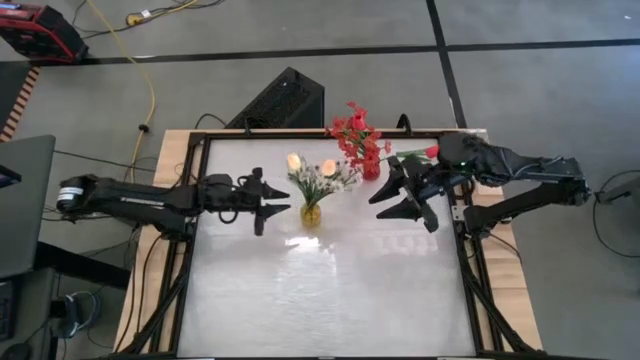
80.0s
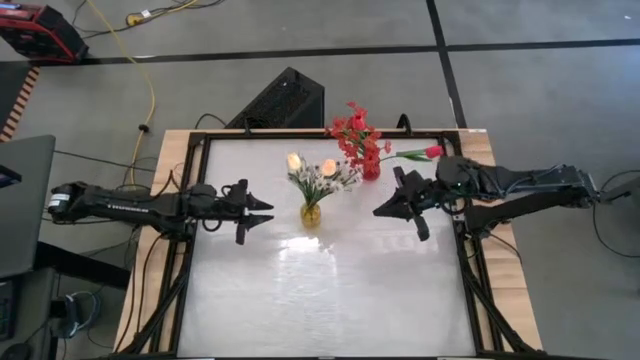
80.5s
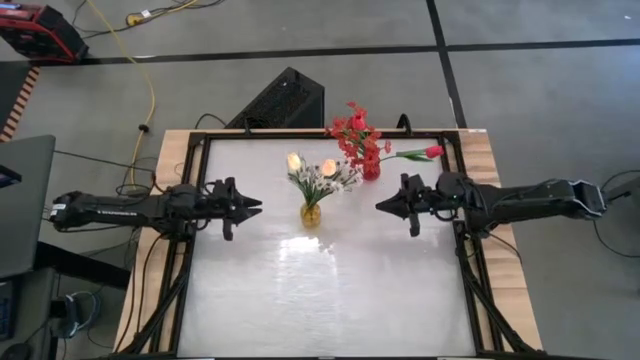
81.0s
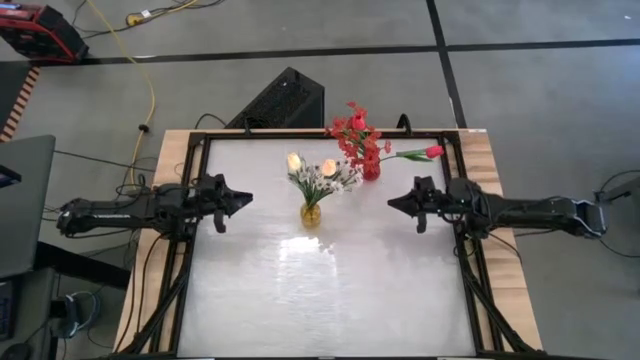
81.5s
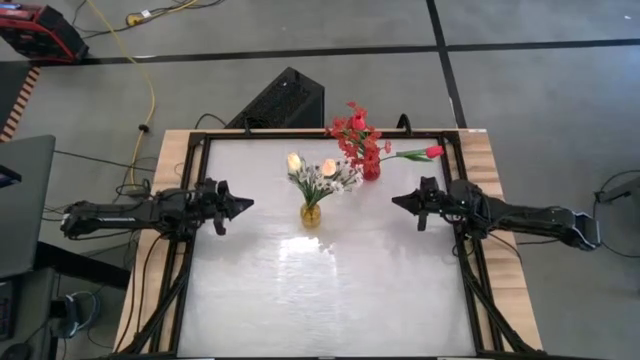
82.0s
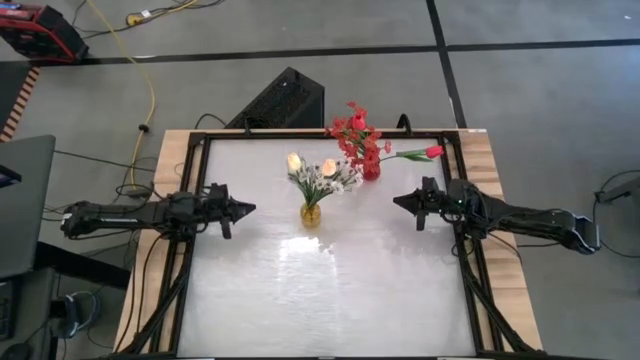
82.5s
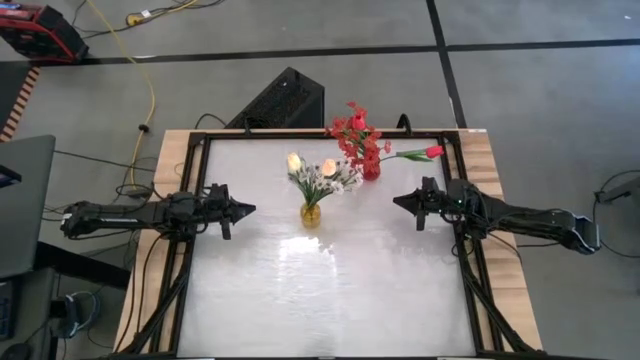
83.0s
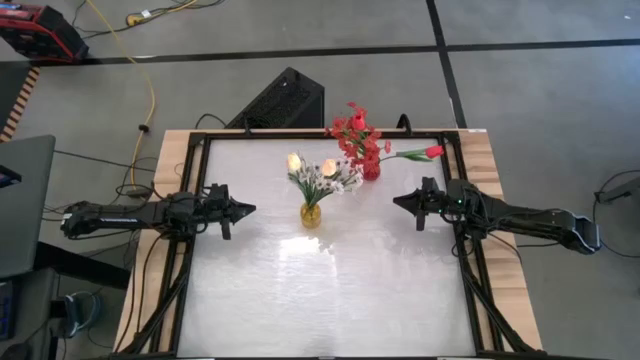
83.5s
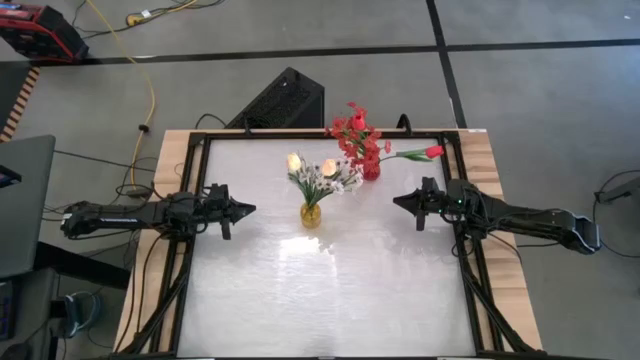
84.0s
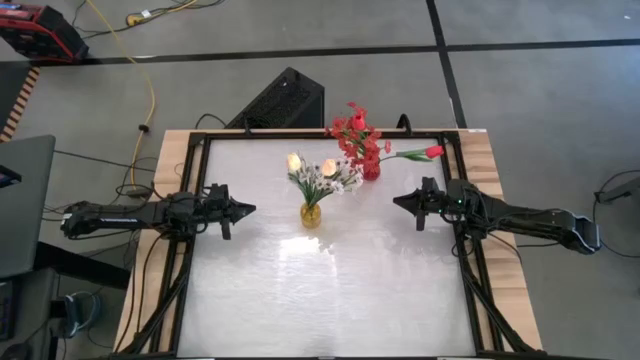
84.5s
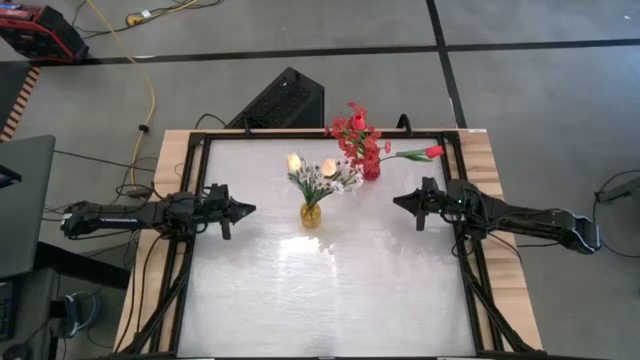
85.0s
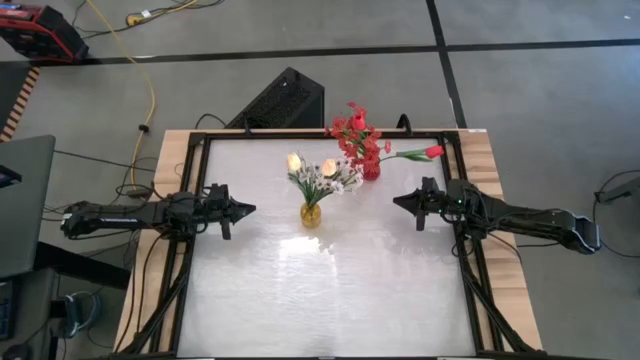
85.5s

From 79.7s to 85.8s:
Task: Sort flowers into vase by color
Return to Home Position

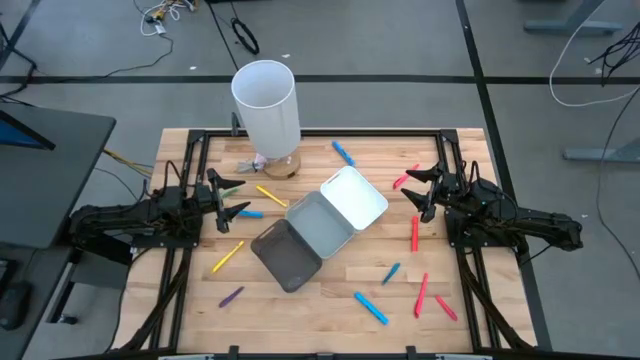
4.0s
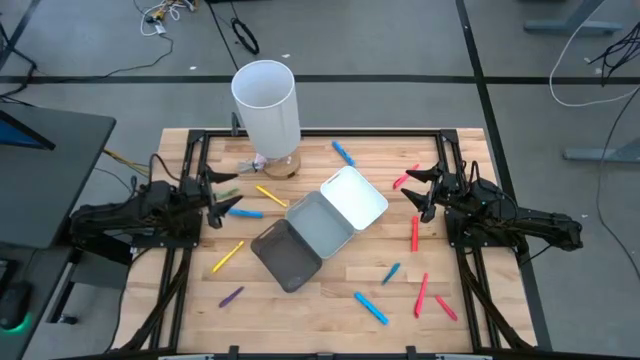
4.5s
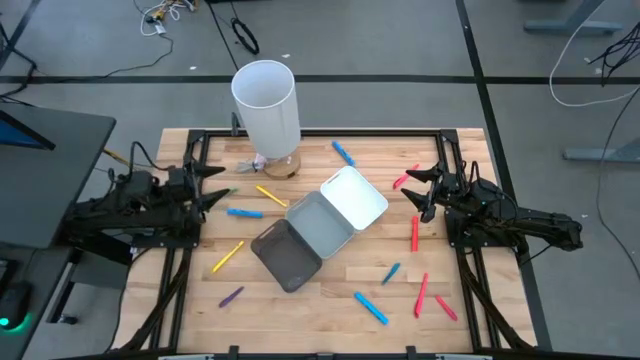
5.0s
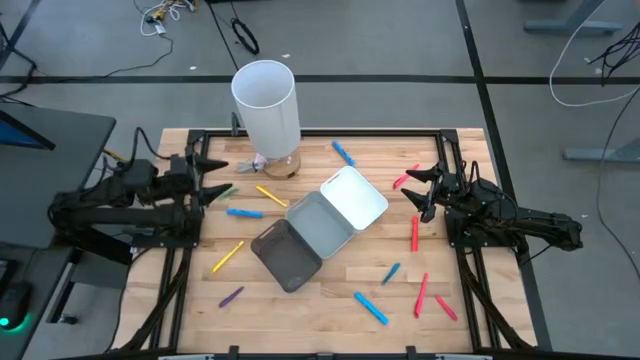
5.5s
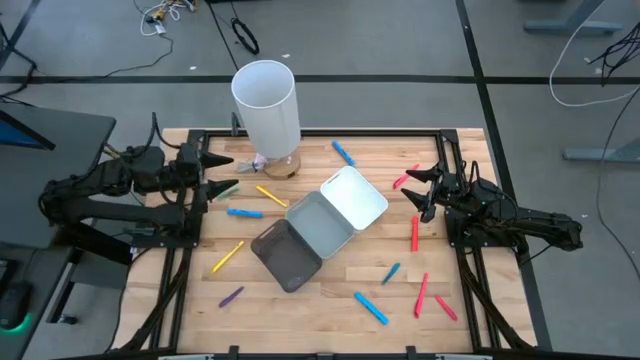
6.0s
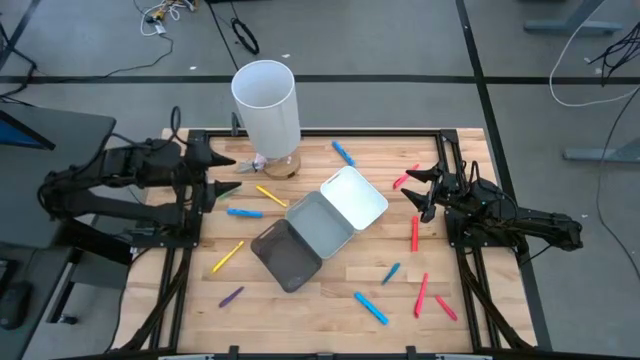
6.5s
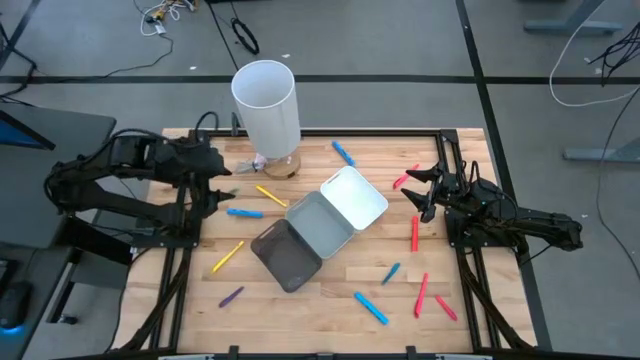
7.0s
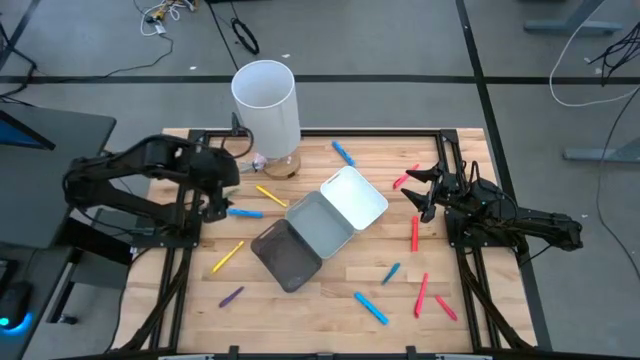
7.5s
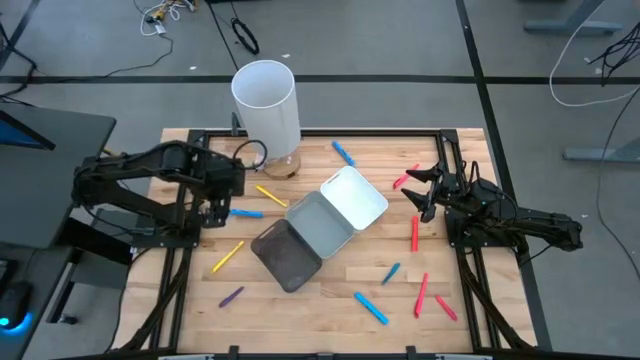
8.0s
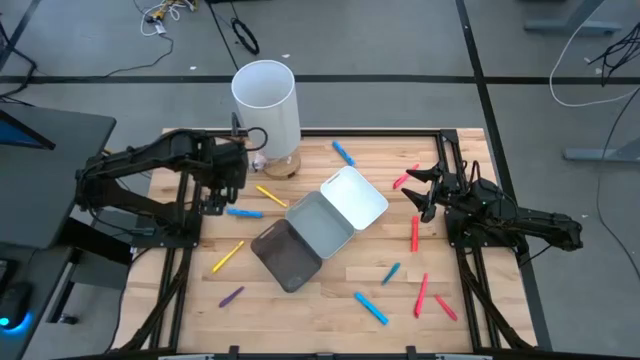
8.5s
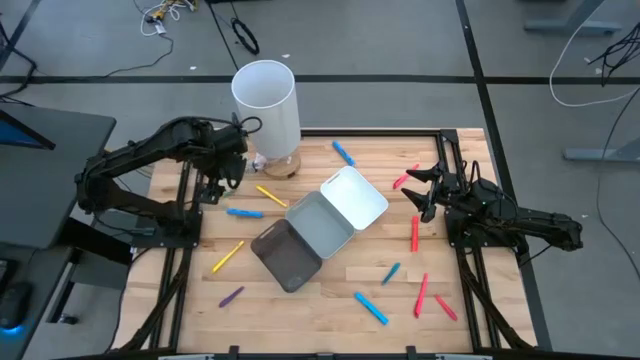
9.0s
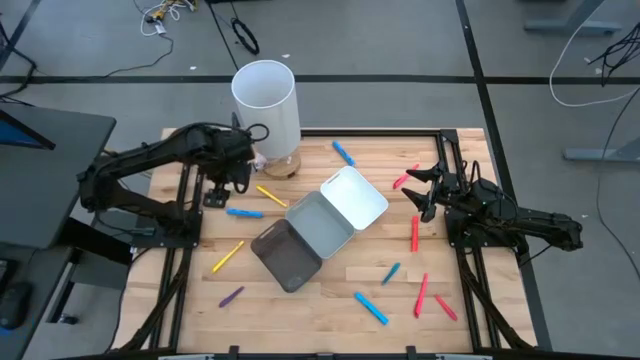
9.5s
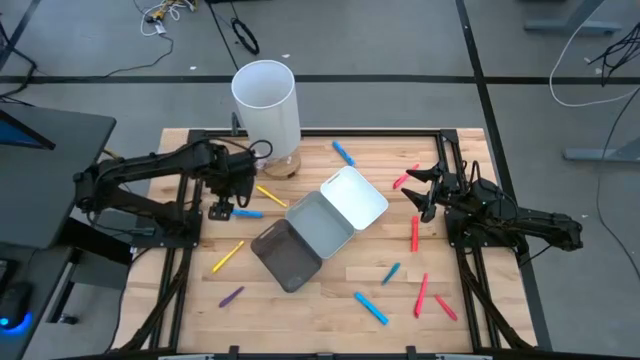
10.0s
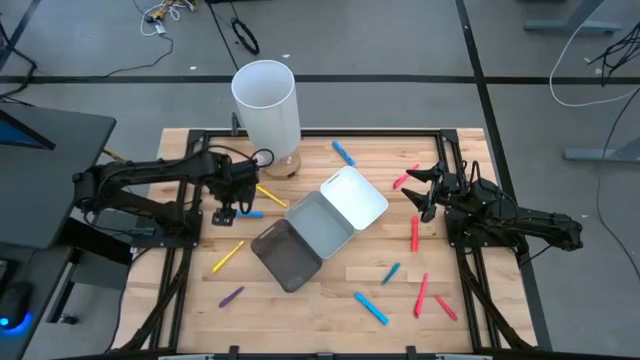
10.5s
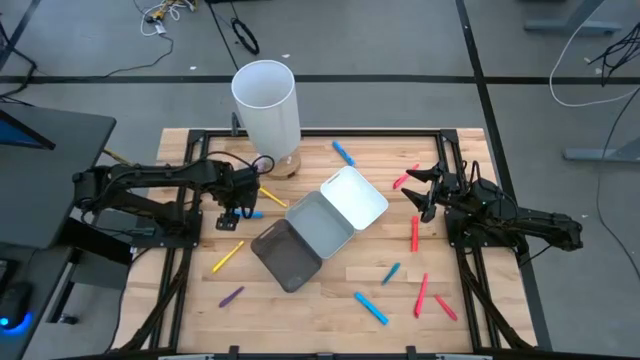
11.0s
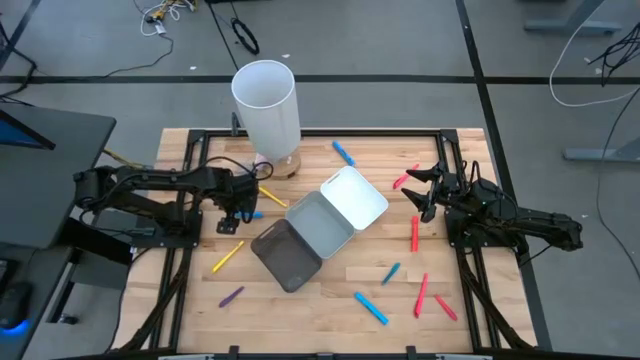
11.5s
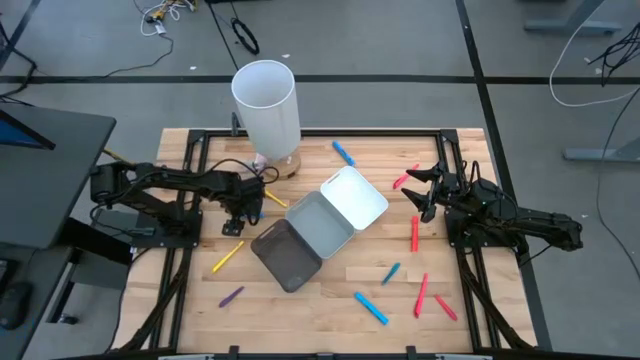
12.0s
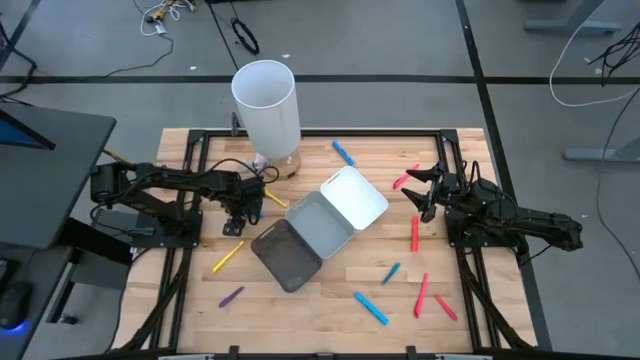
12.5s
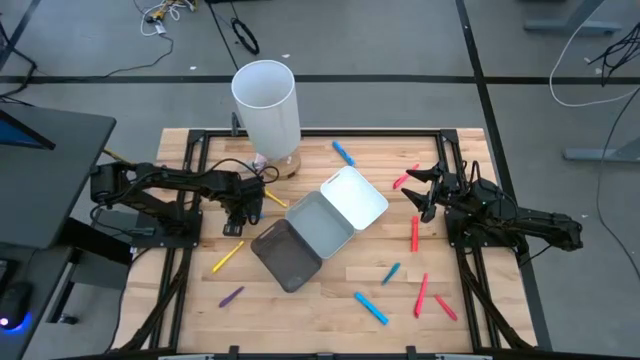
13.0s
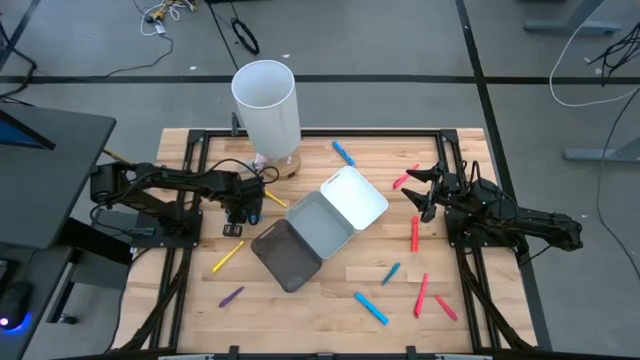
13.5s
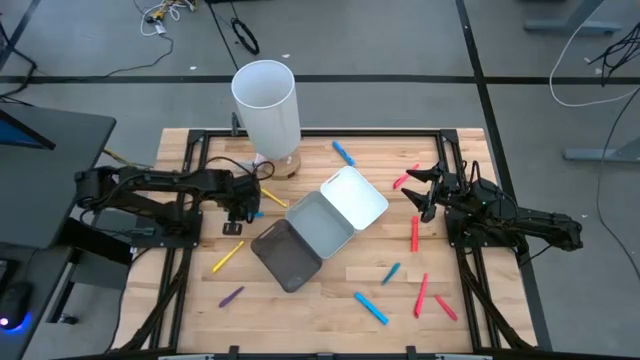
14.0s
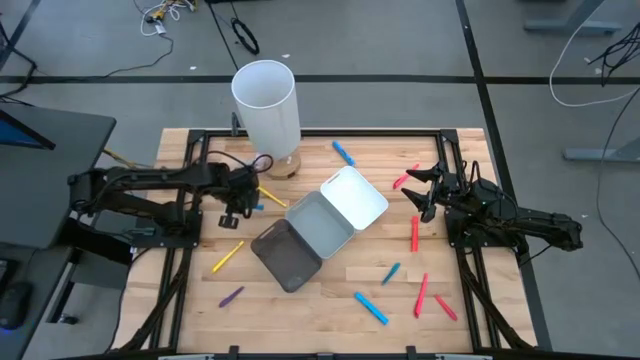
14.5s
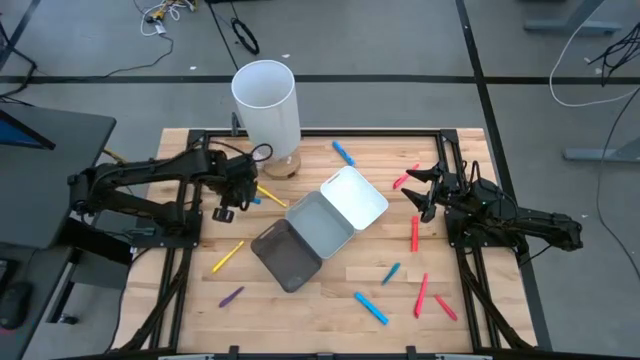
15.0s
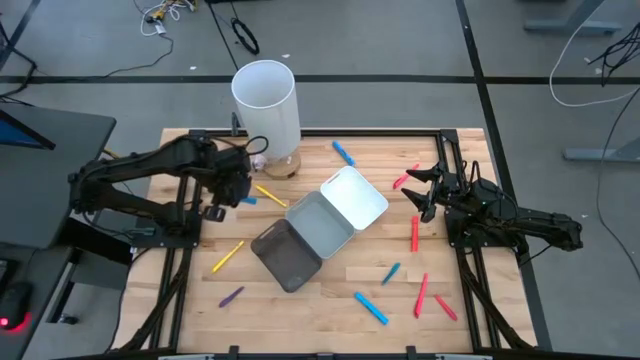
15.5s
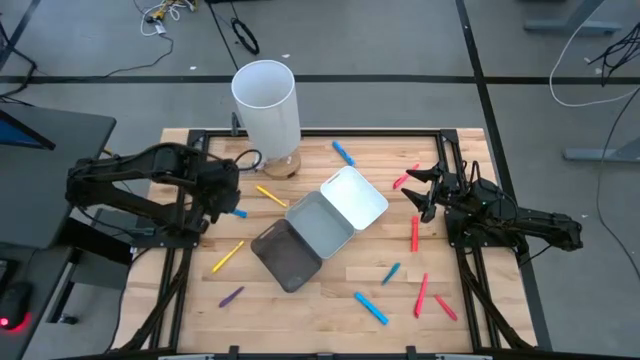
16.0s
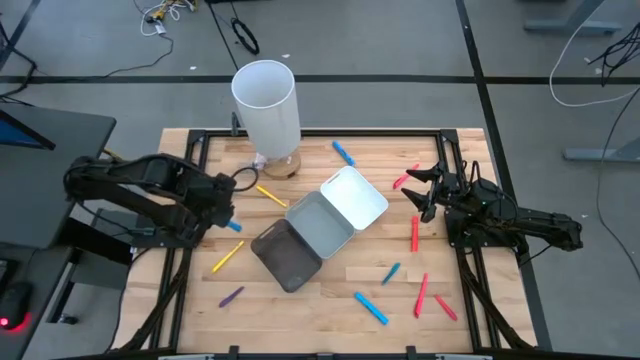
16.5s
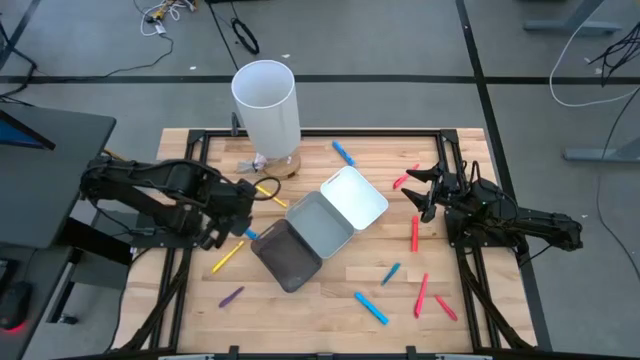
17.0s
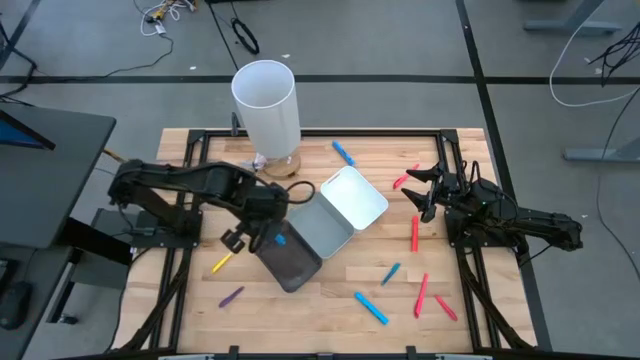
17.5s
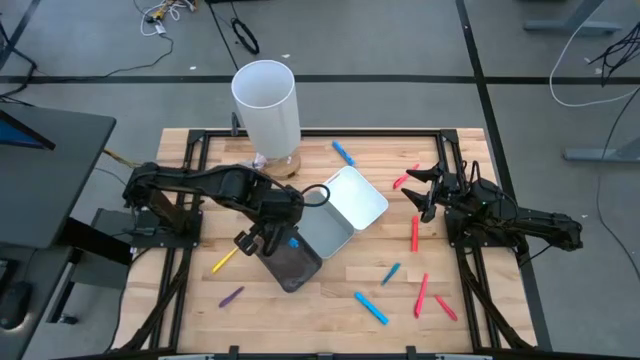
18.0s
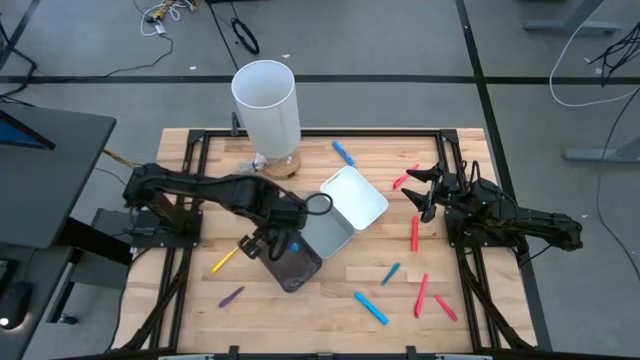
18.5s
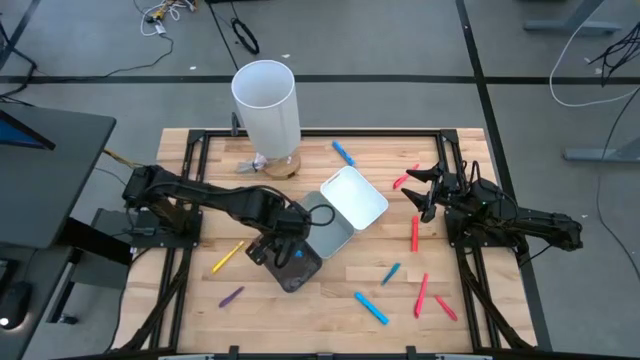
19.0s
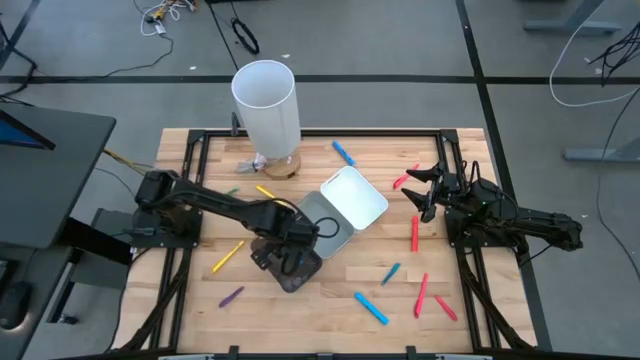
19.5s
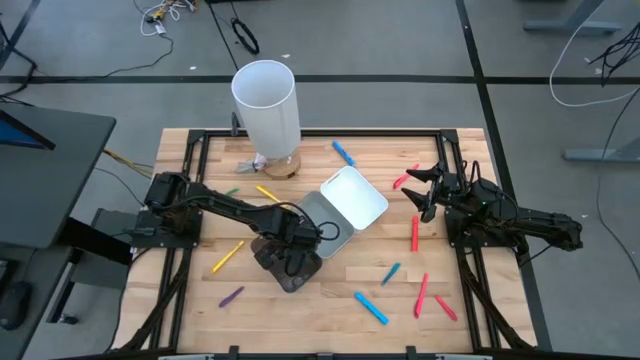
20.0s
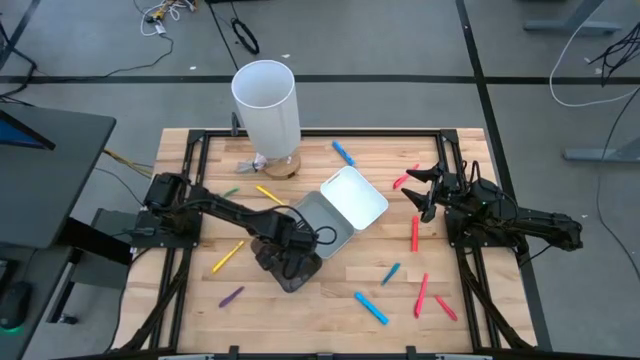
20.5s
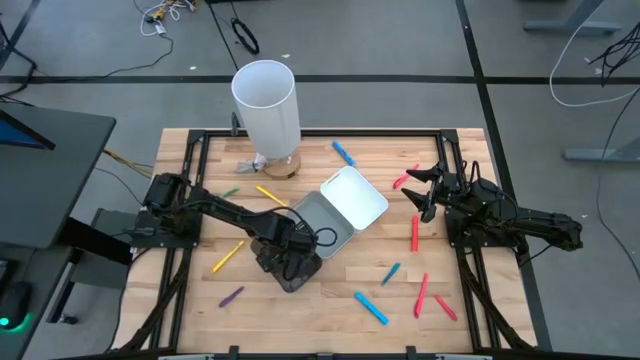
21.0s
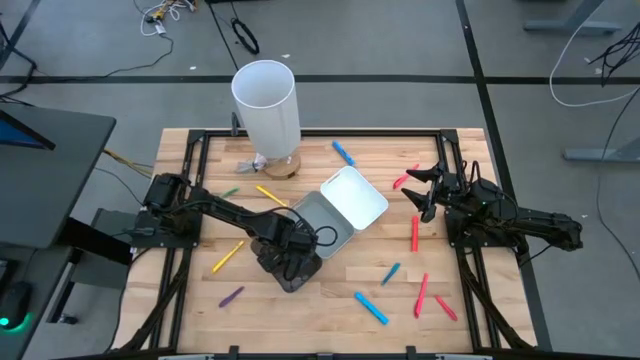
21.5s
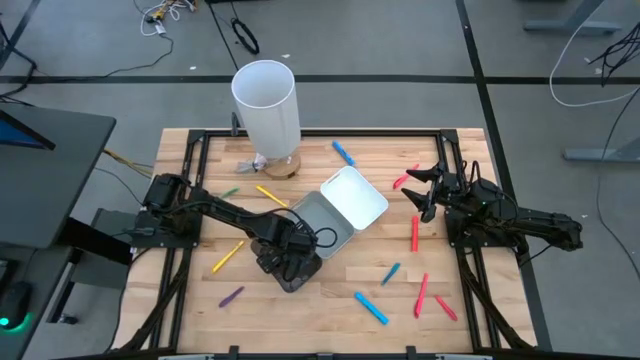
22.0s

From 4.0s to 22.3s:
Task: Pick & Place Markers
Put the middle blue highlighter into the black bin
